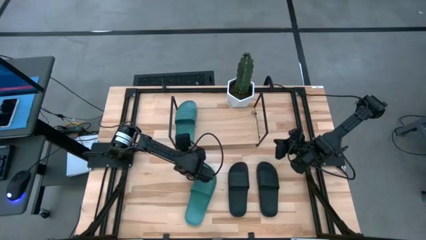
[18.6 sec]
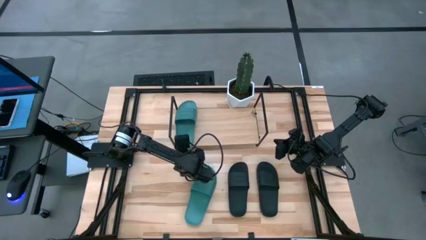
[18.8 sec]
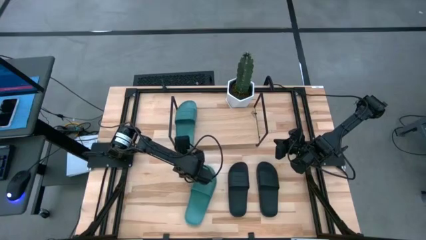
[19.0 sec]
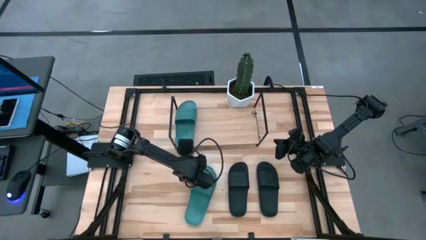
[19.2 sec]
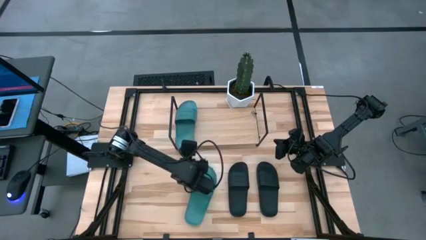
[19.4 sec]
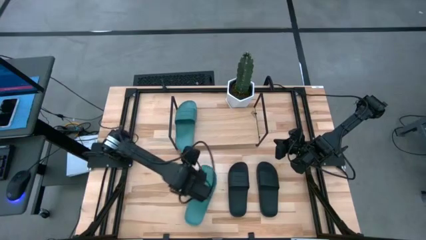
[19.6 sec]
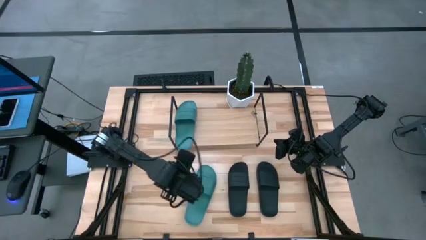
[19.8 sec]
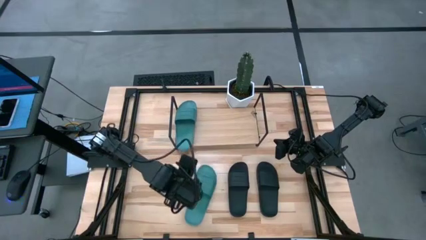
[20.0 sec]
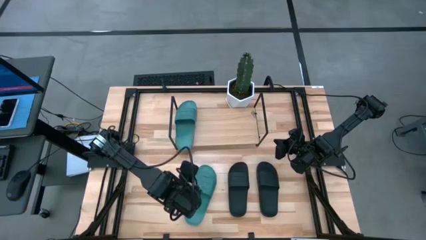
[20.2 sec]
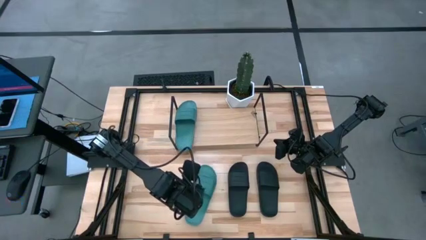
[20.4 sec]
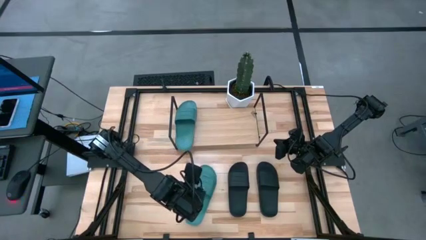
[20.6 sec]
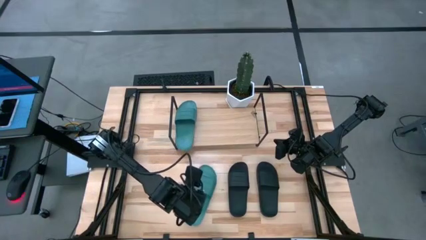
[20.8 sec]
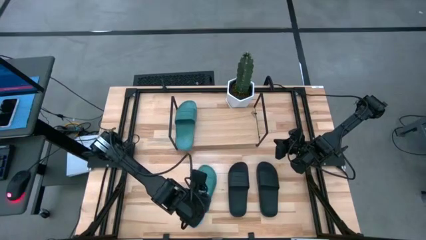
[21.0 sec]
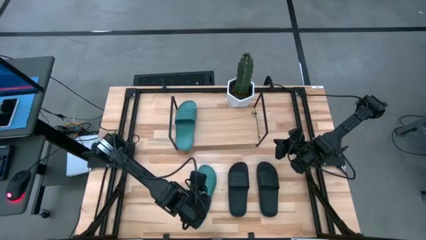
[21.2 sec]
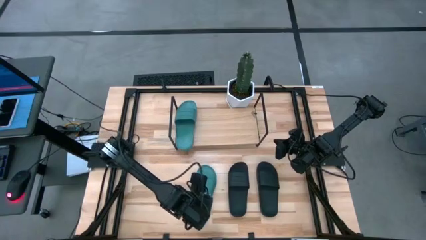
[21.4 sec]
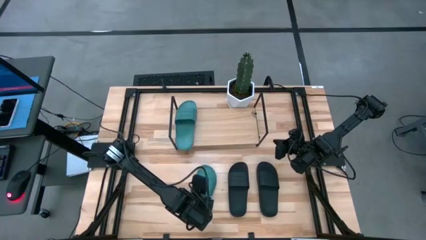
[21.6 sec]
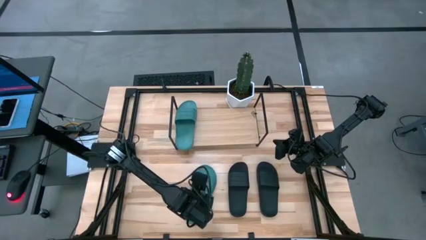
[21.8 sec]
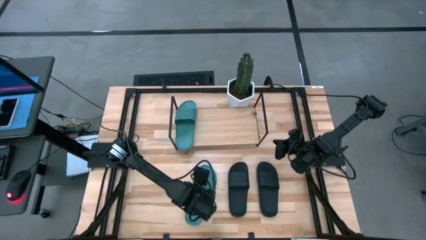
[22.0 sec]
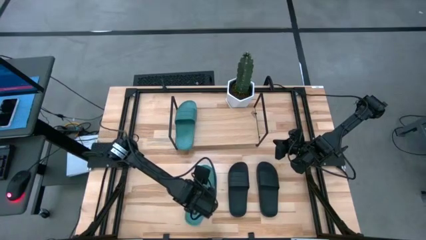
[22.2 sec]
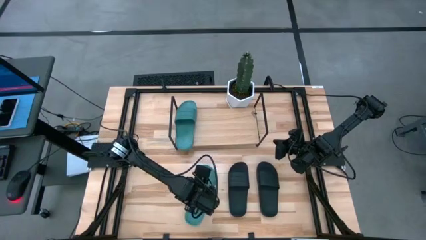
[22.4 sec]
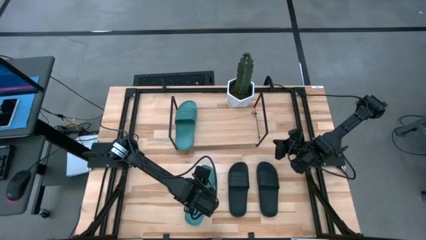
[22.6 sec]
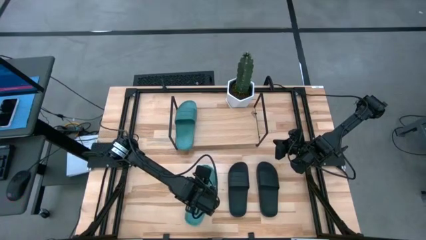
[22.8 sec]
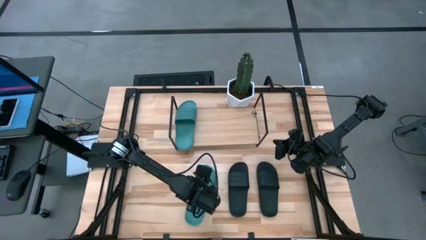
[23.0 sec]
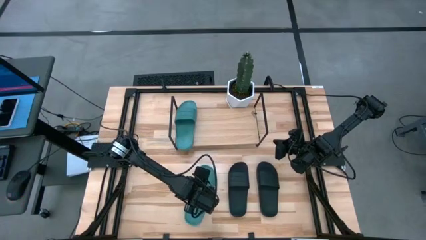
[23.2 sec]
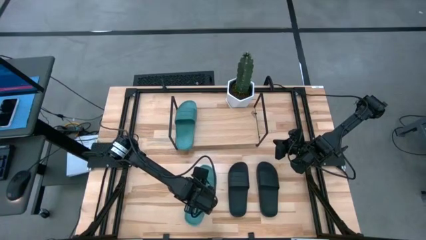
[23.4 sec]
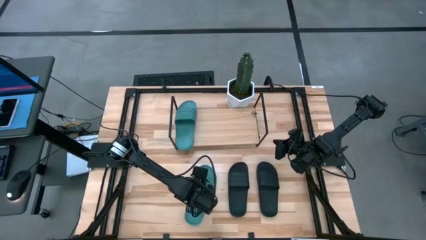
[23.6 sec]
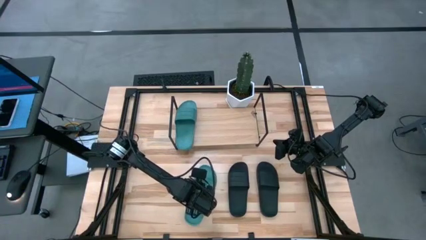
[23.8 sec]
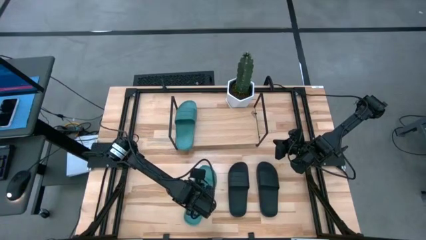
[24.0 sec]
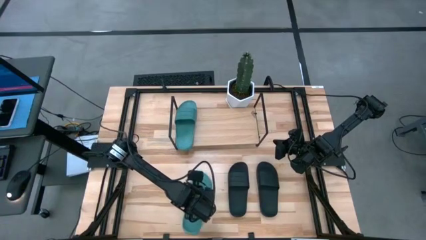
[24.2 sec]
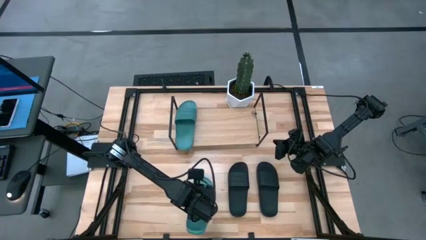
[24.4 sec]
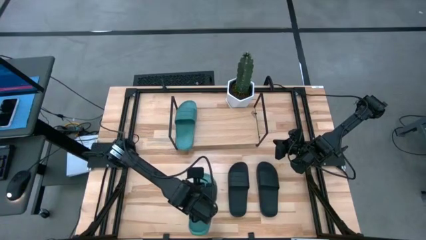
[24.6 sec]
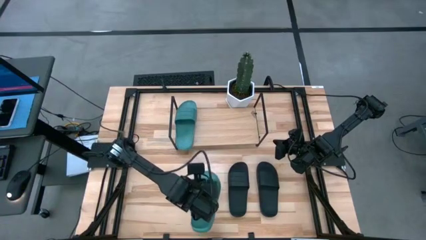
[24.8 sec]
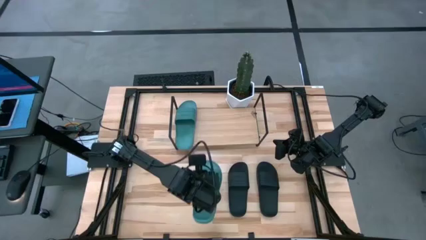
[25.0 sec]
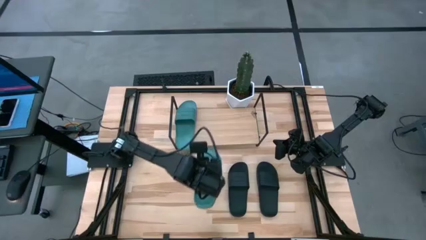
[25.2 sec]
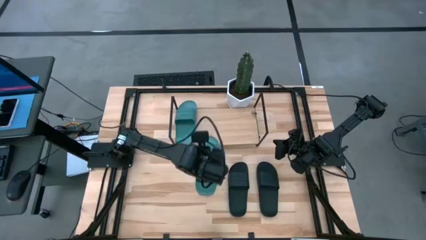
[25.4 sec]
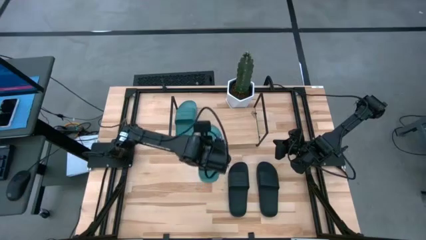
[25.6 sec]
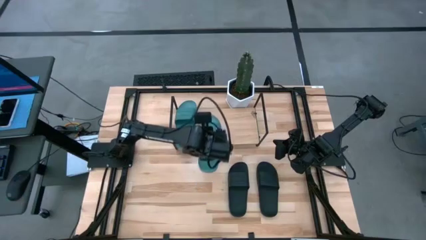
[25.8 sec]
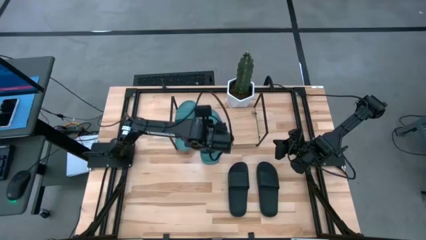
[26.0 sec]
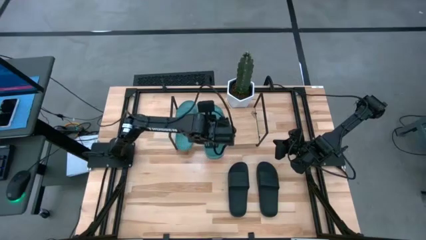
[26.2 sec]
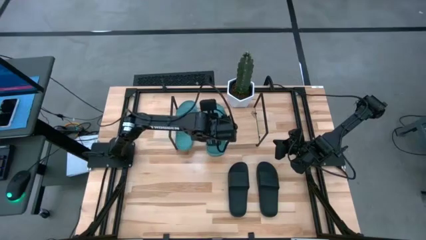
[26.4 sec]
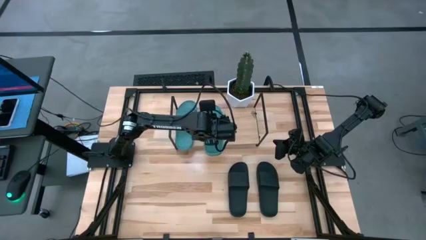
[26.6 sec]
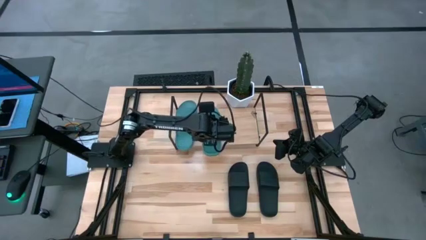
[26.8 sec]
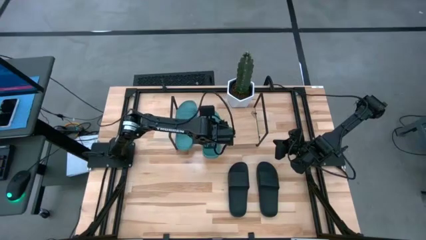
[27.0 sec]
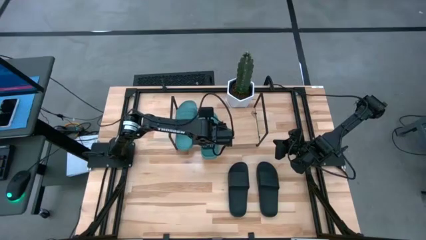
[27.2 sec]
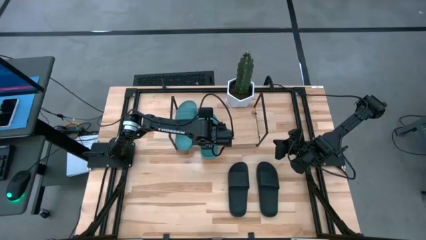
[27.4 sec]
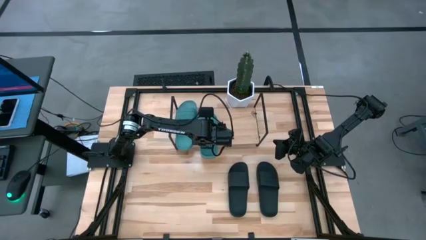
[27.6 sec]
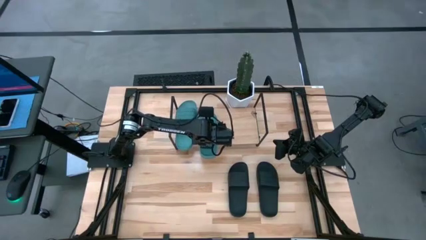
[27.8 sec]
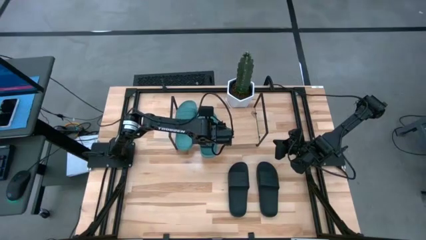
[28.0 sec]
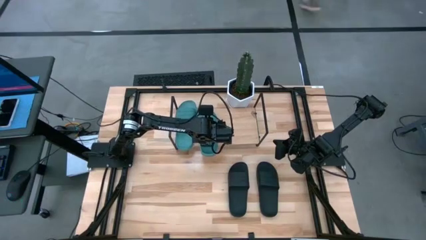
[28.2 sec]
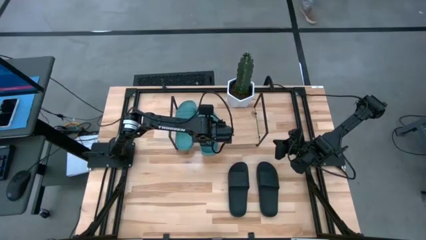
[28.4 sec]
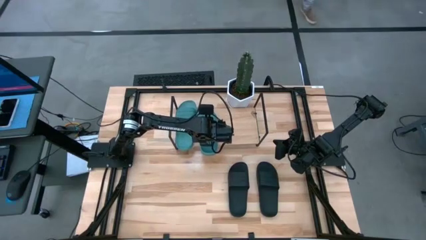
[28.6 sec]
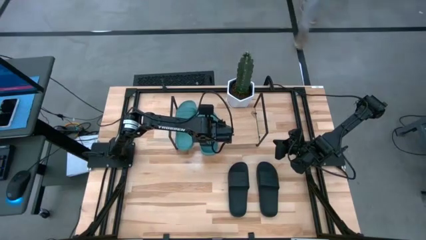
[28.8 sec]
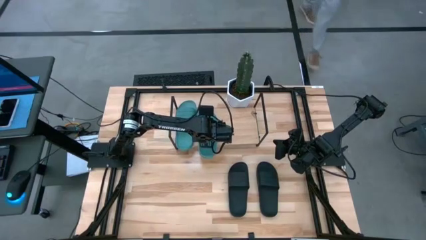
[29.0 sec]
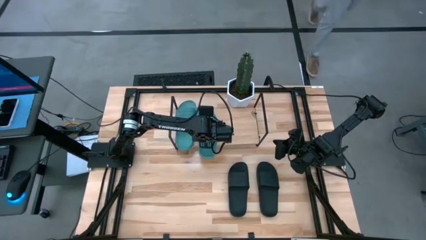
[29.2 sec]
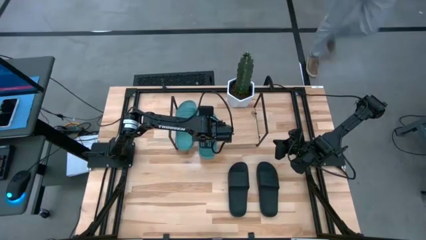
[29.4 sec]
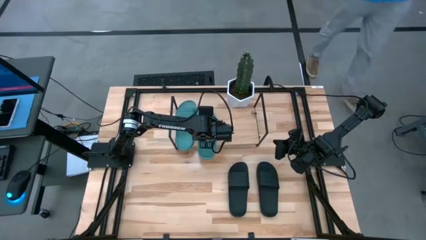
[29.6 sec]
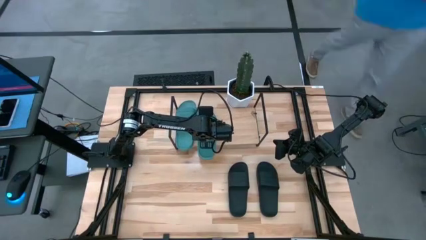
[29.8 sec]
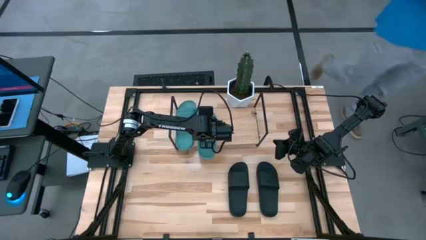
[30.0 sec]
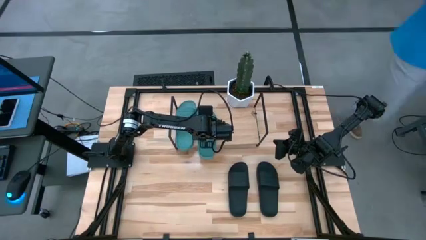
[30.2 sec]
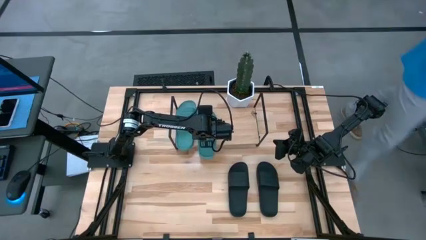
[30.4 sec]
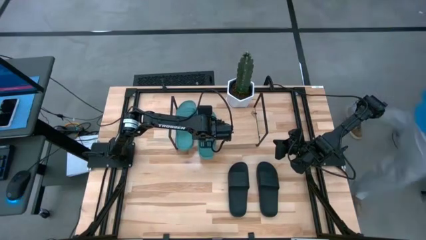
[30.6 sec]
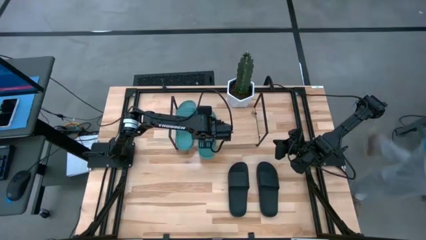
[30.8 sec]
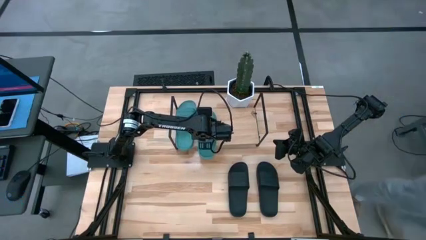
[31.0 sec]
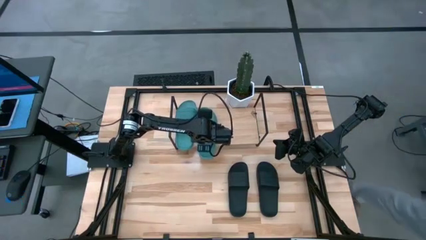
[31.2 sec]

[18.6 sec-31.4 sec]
Task: Pick and place slides into the shelf
Put the light blue slipper on the shelf
